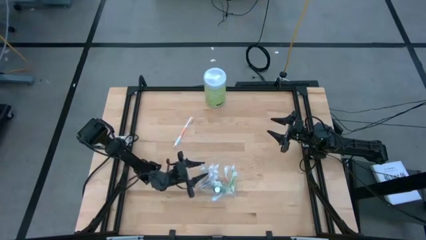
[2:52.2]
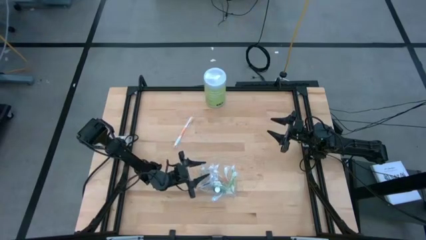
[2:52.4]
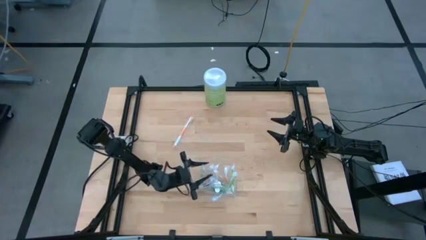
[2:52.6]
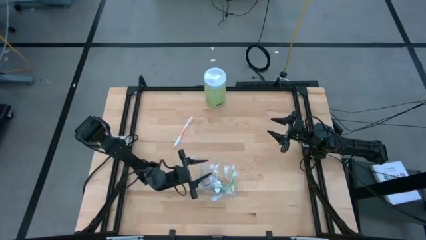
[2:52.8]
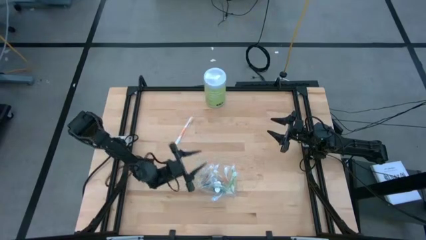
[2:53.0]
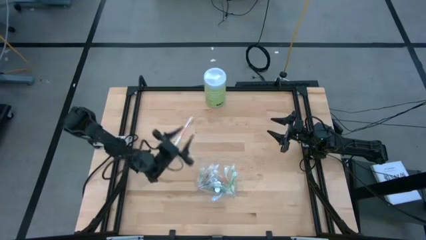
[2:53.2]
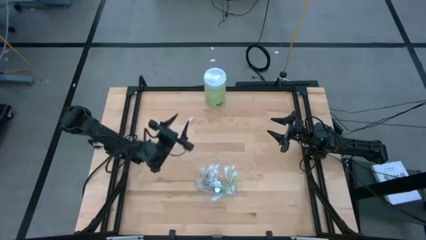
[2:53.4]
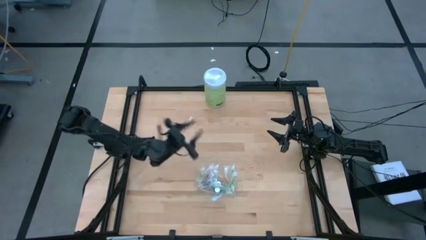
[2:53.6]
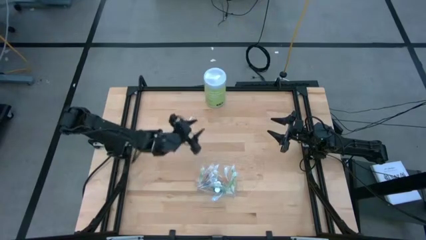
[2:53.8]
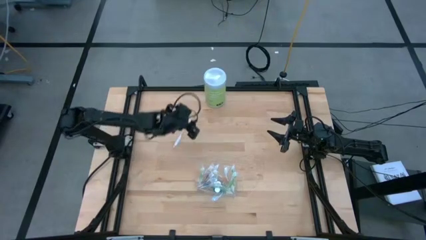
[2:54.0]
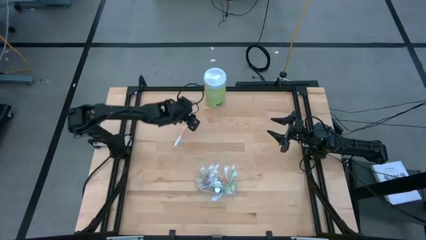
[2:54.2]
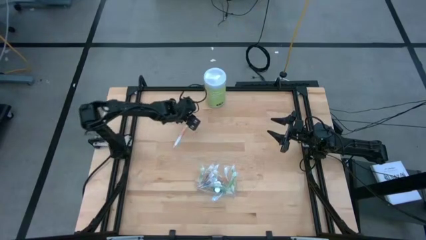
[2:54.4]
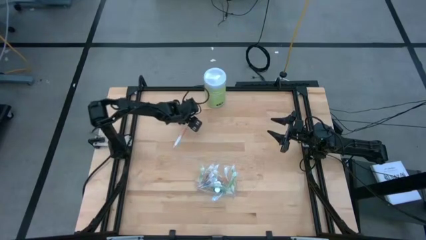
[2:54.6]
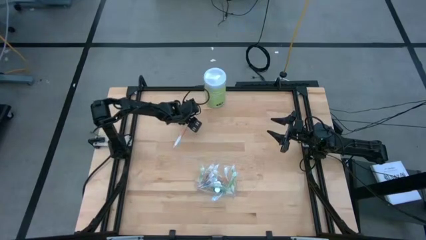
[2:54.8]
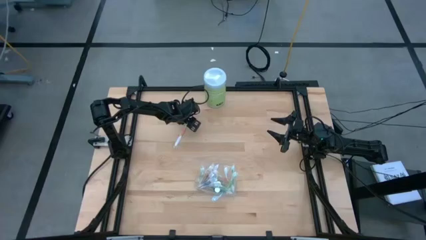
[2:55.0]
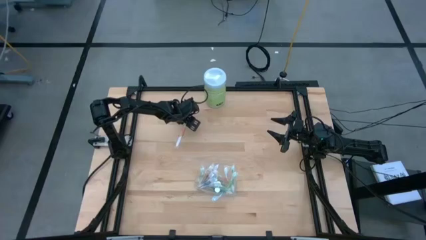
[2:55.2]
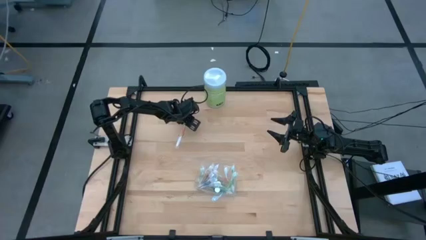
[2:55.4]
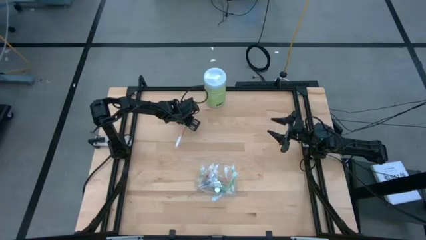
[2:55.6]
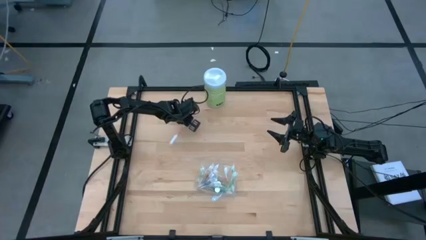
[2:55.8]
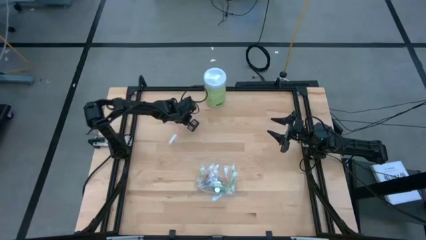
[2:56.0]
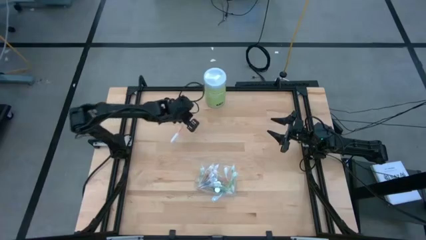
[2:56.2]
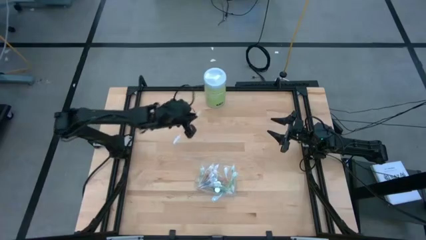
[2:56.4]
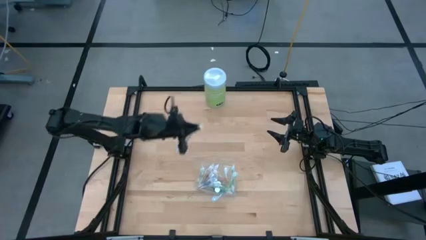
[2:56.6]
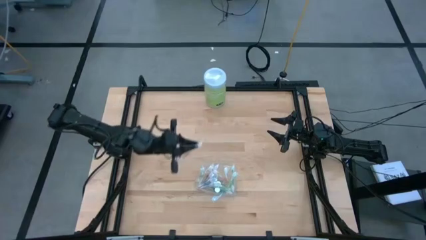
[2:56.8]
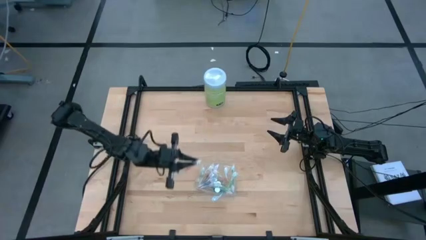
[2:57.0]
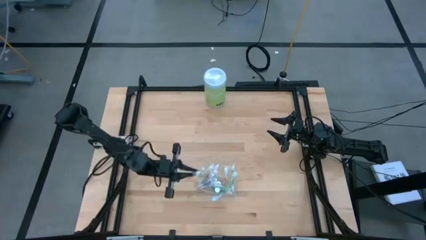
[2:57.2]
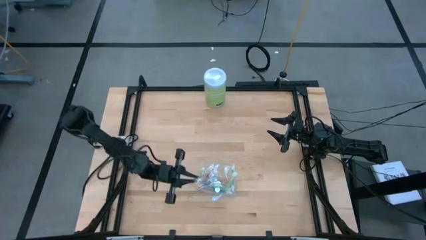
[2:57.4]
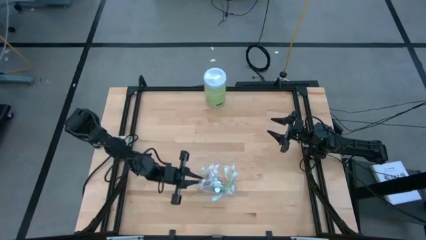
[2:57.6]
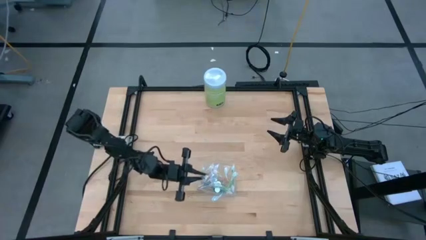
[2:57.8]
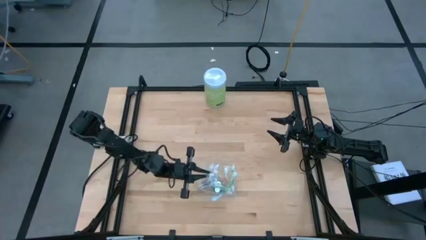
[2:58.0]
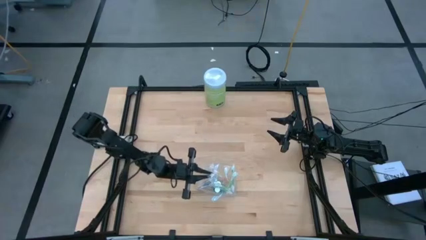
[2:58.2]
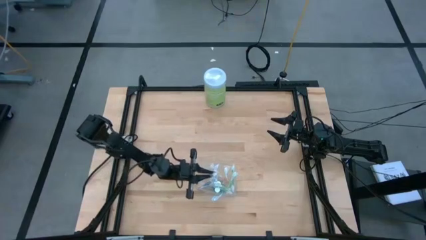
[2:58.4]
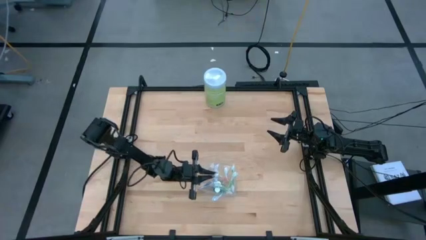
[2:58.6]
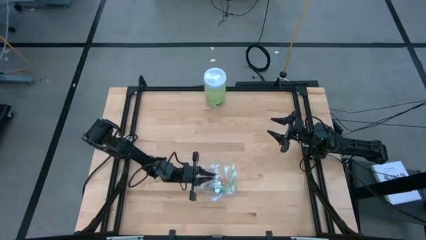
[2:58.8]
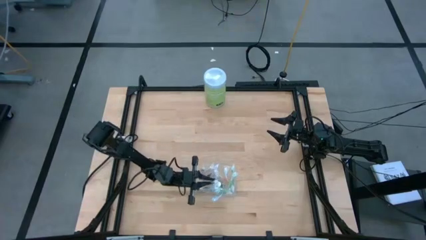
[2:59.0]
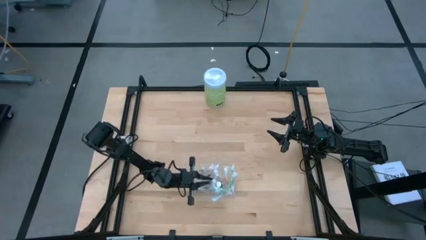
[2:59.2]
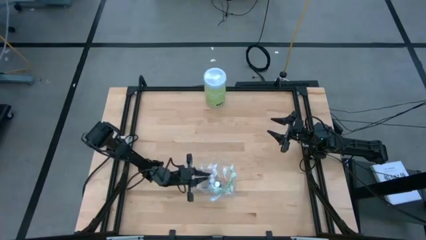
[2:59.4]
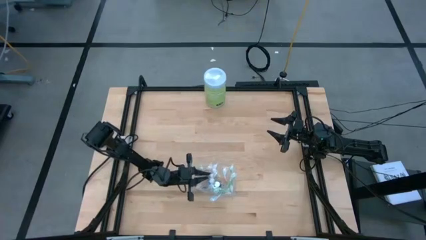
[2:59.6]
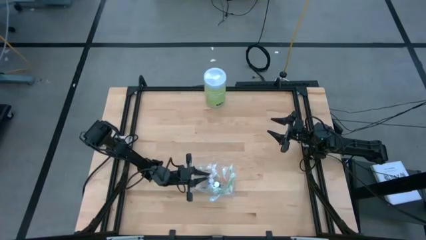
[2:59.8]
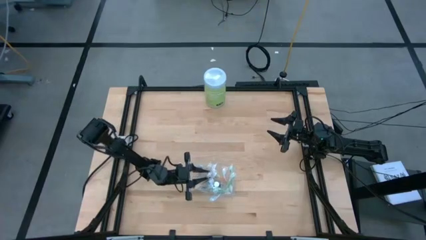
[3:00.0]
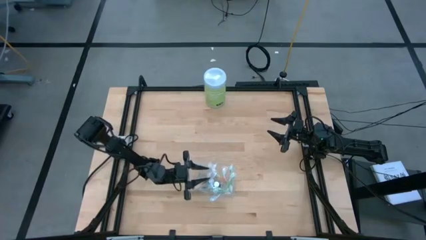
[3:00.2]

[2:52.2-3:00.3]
Task: Pick & Place toothbrushing station
Put the orange toothbrush into the transparent organizer

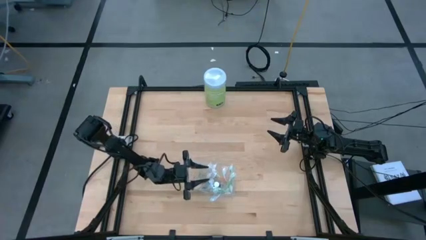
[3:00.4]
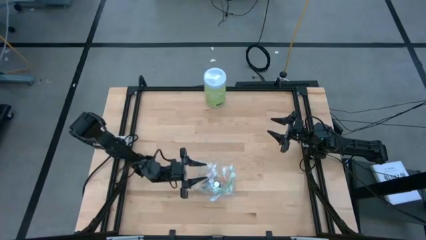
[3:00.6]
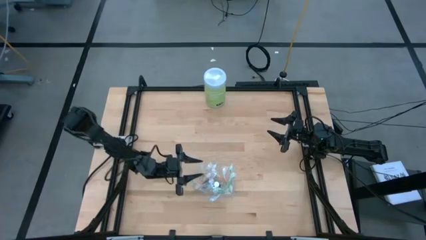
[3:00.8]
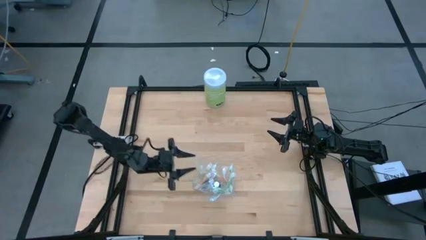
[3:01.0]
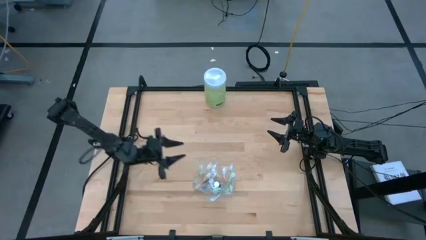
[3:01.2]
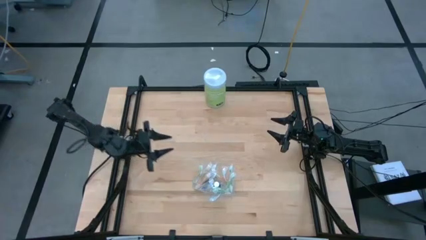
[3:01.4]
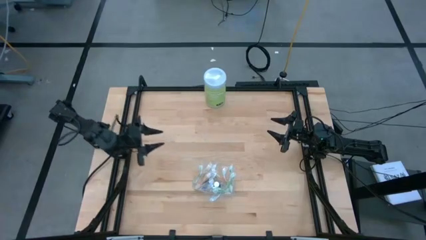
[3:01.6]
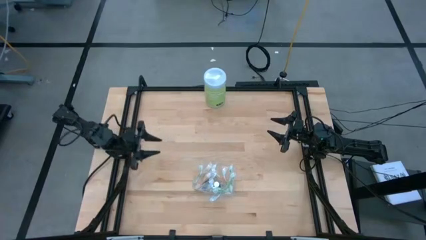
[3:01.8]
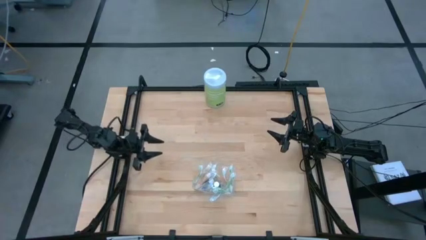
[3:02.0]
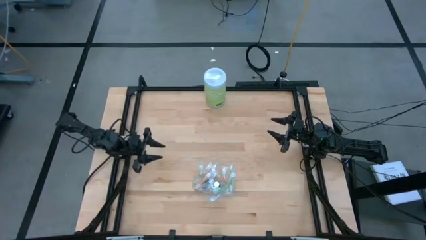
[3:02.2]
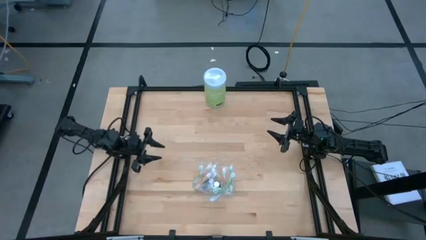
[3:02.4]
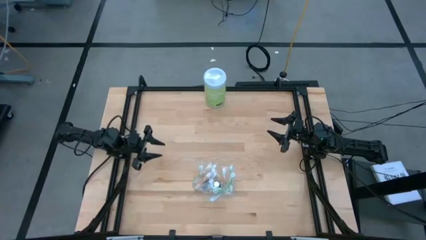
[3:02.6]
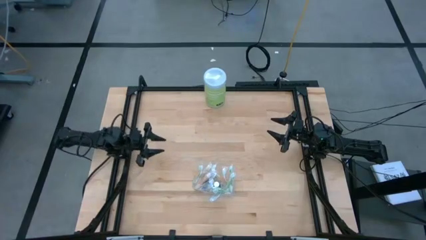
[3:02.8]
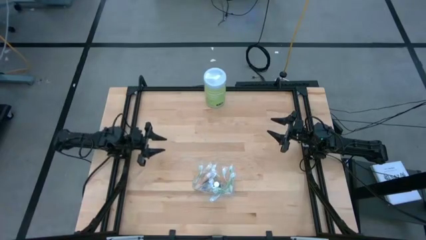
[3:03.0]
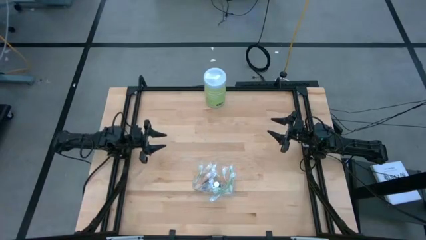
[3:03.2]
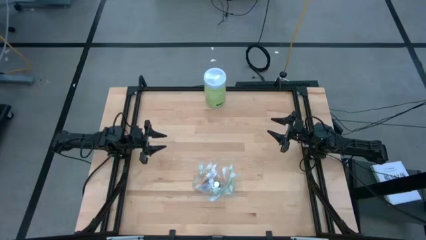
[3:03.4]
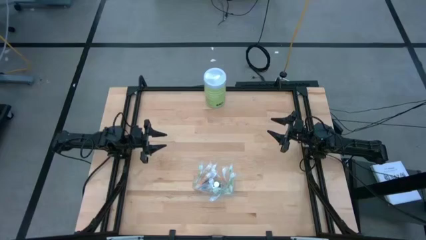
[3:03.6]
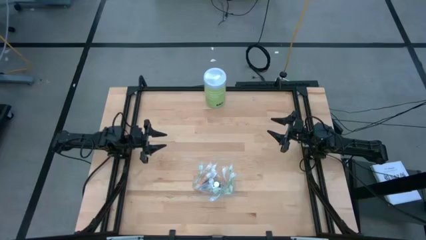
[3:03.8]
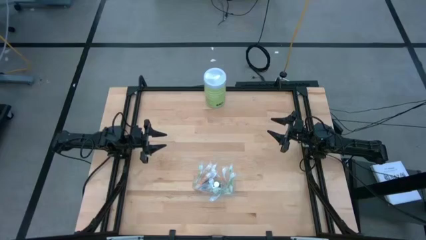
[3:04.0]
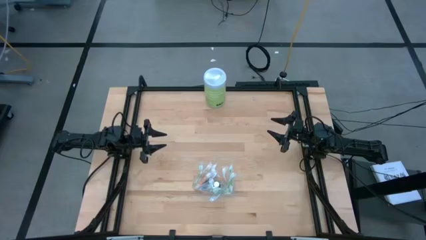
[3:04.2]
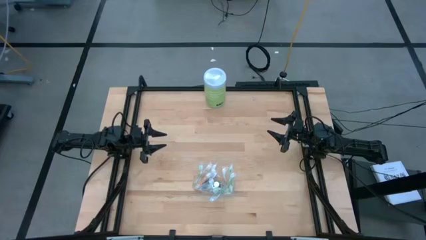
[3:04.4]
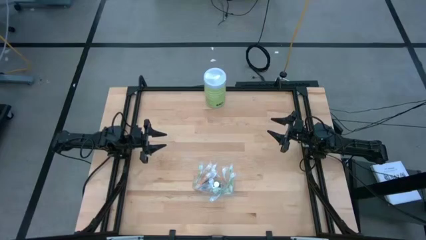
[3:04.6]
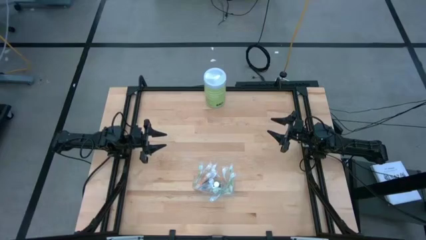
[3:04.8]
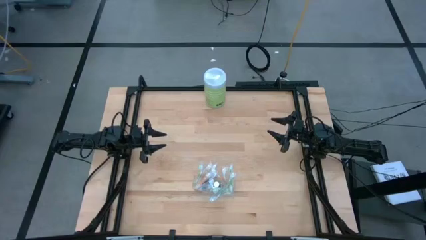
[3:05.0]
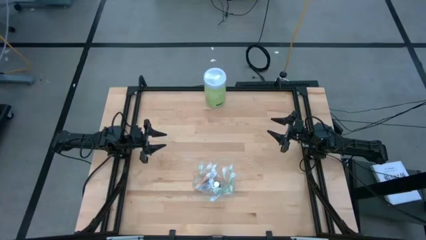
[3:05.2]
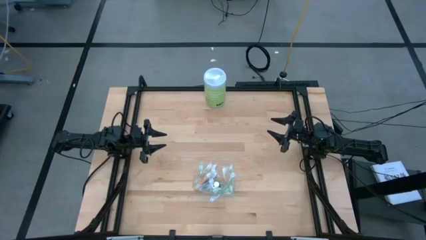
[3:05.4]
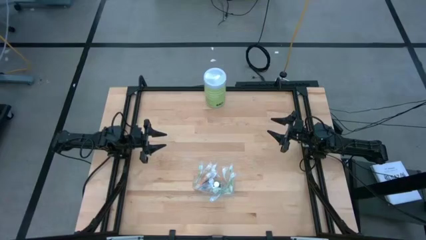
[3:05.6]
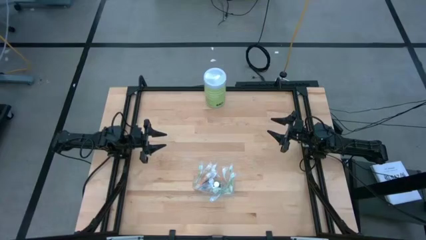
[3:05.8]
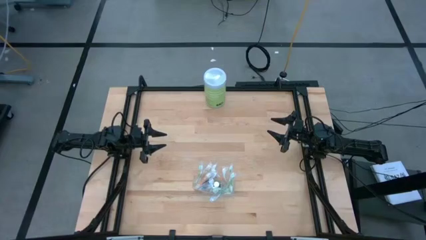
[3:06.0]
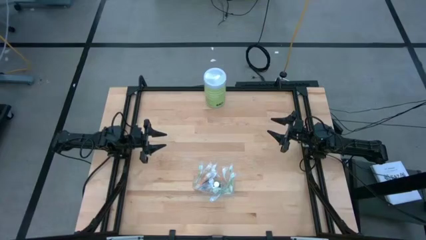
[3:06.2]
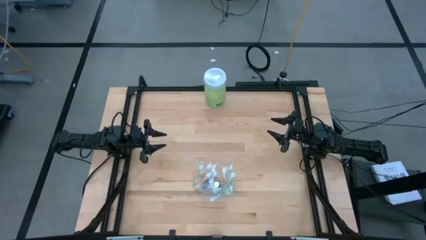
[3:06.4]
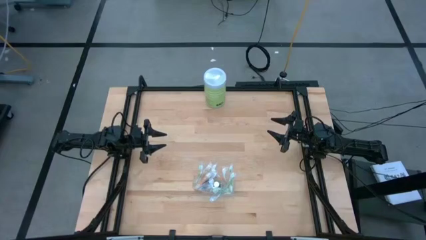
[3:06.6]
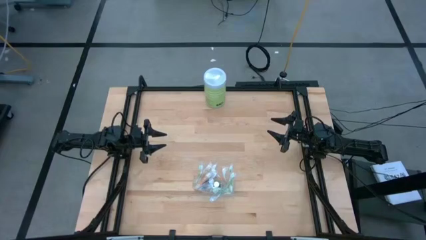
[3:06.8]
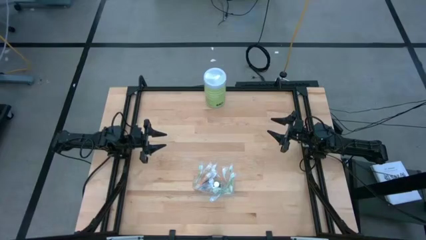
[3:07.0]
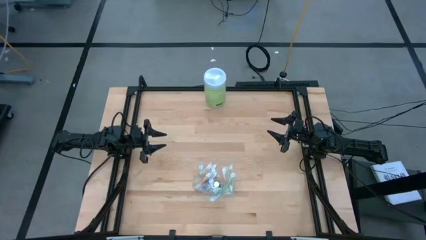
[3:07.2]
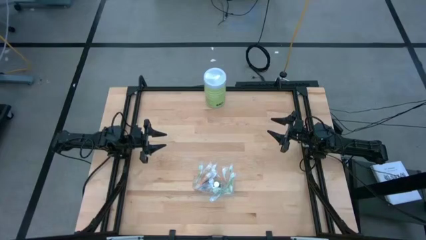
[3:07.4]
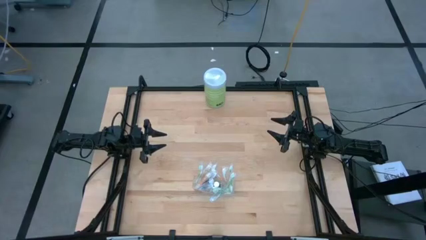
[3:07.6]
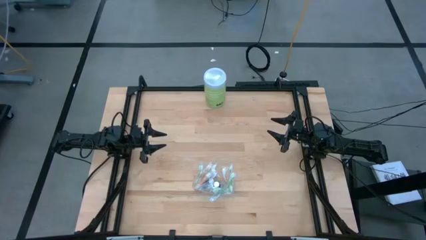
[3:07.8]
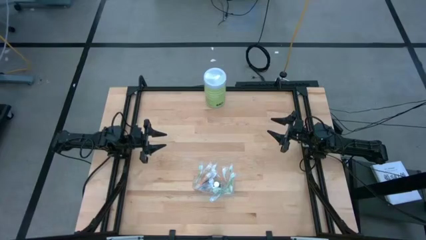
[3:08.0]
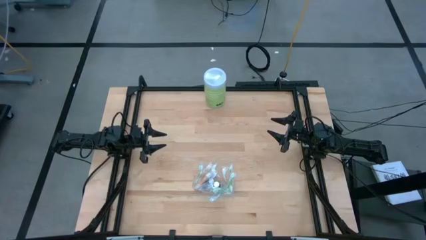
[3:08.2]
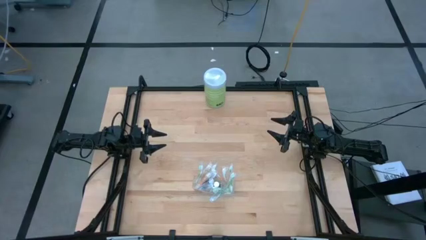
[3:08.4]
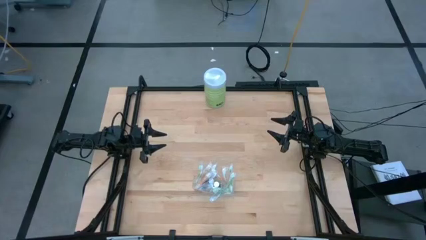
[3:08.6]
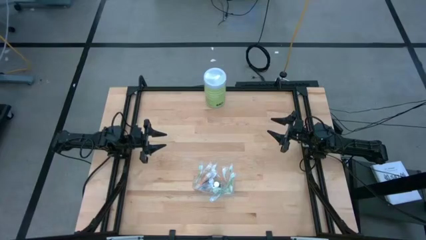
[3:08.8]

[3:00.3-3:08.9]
Return to Home Position
